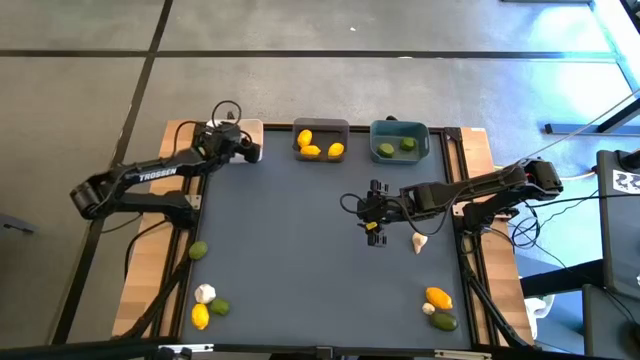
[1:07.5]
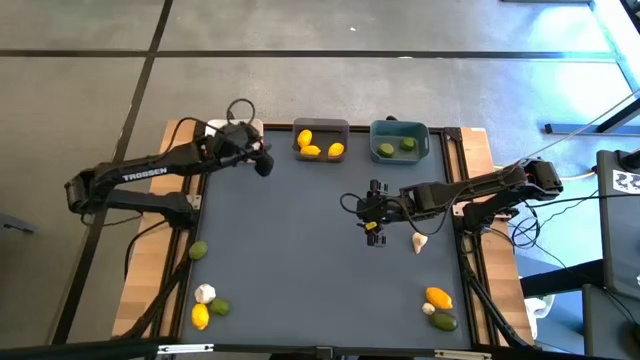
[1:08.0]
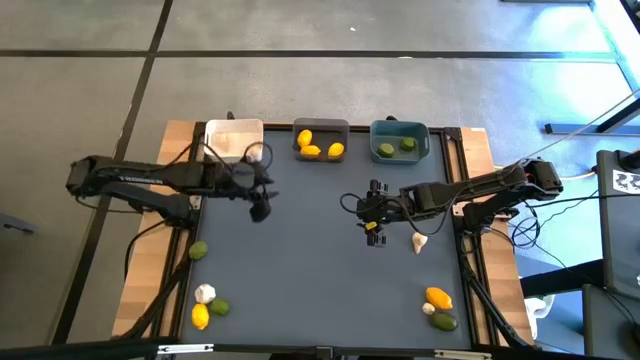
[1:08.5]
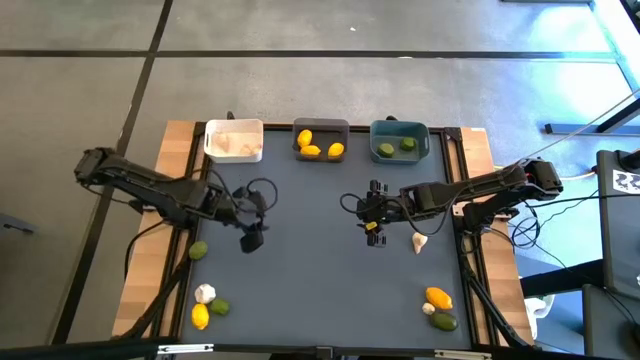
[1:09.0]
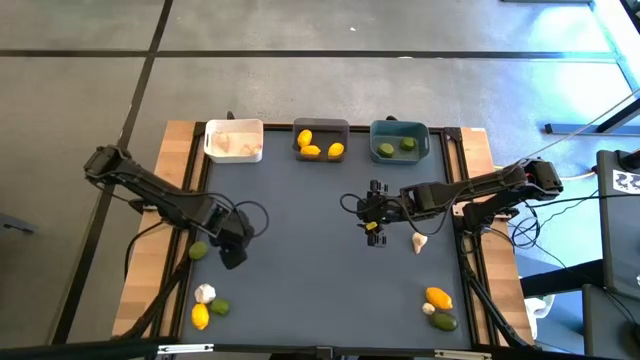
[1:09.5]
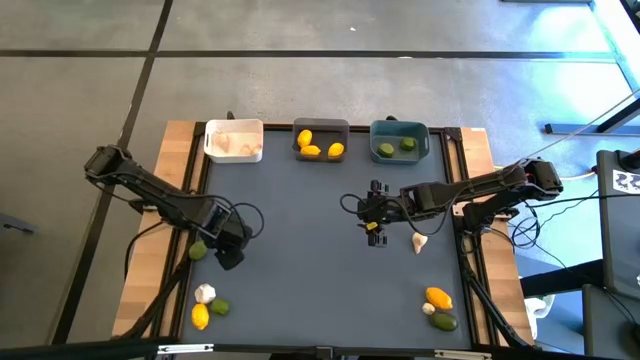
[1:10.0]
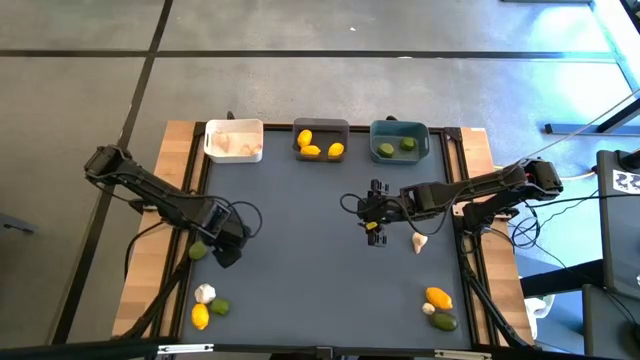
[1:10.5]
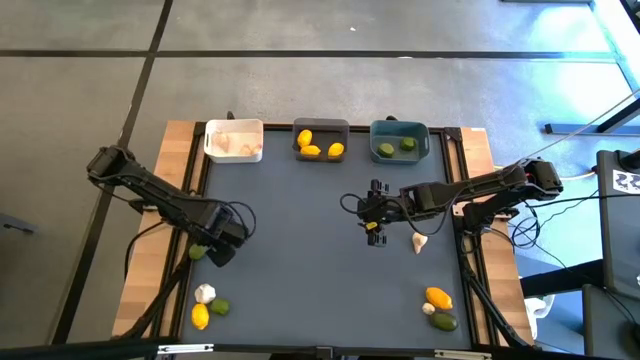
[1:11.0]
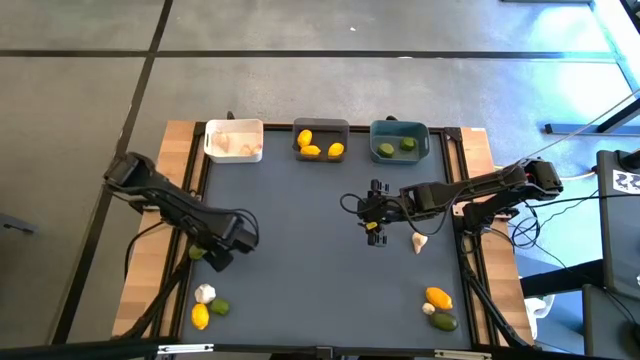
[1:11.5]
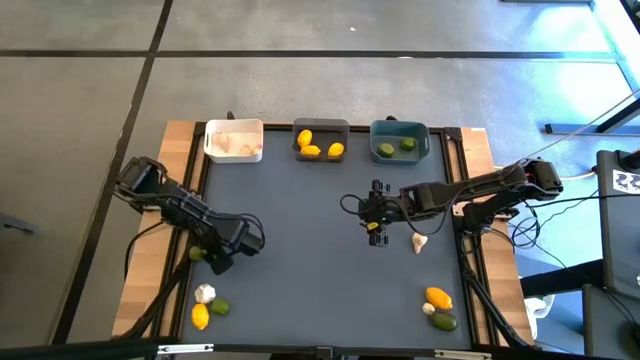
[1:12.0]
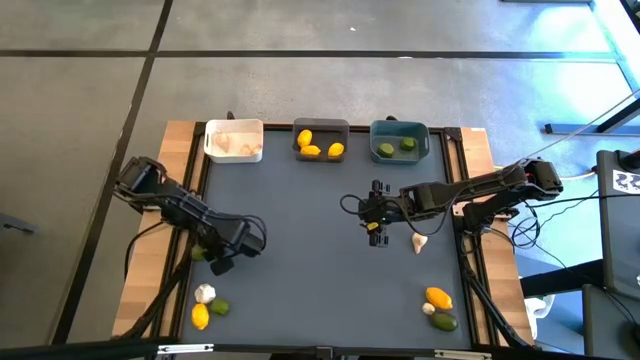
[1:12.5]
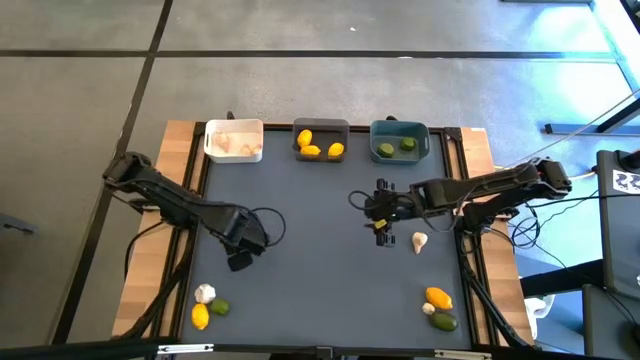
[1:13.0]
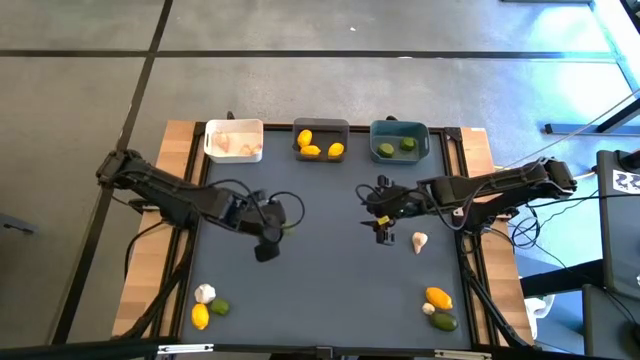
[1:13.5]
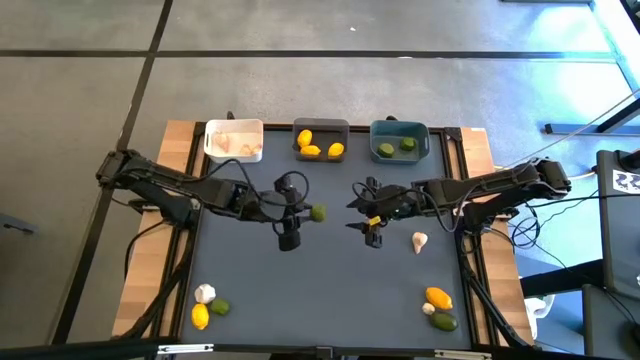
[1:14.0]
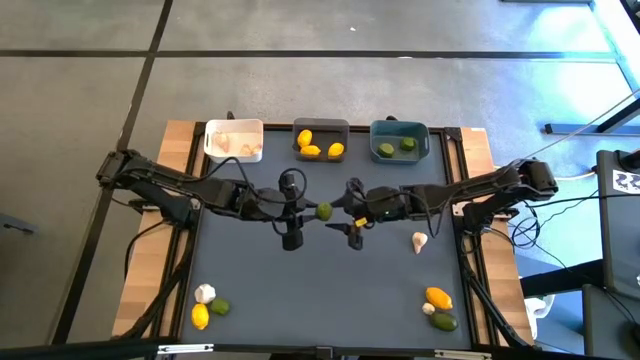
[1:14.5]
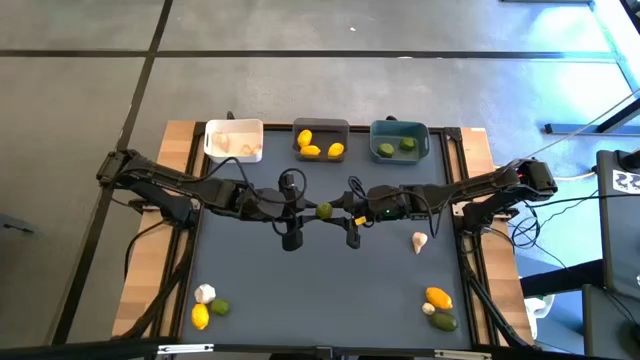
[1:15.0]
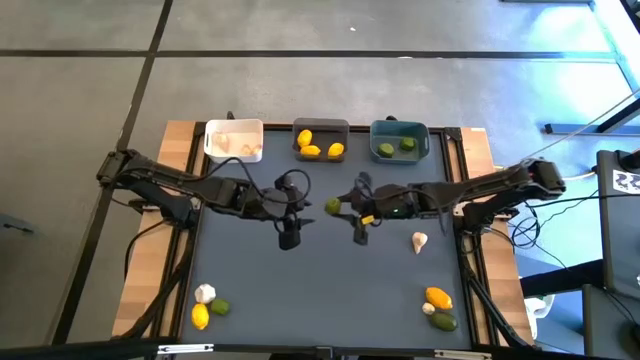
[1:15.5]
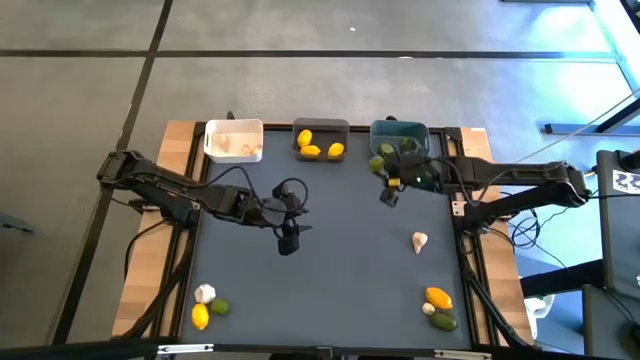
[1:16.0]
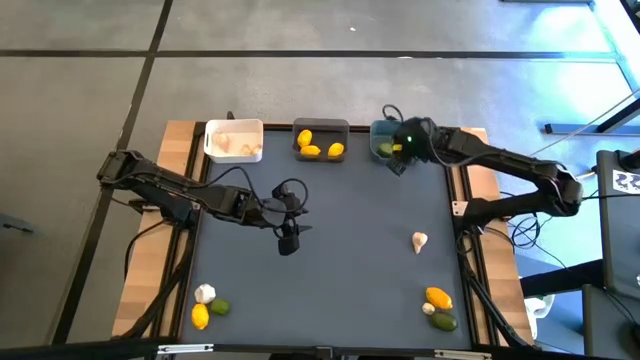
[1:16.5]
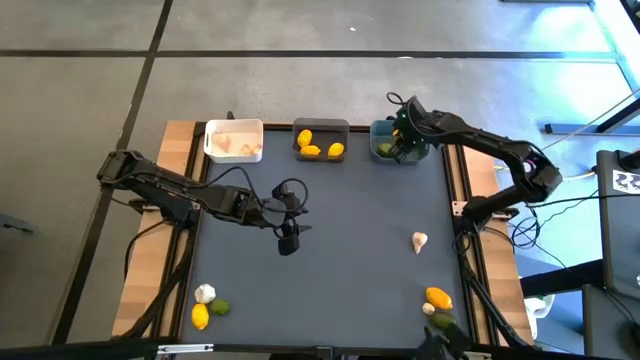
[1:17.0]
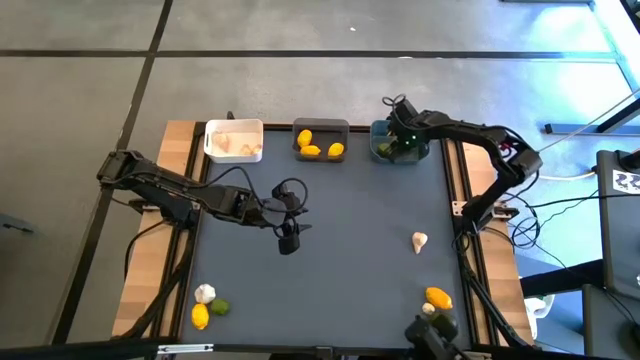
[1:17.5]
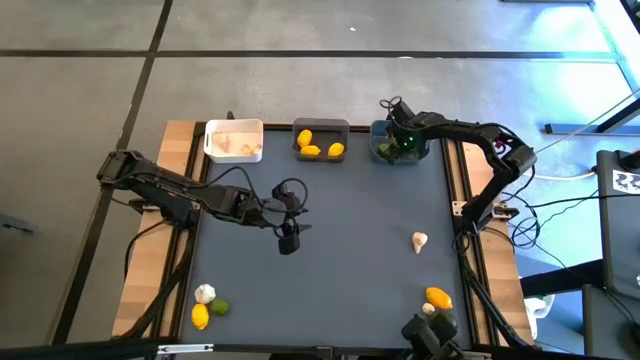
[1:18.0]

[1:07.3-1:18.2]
Task: Sort produce into baskets
Put the lime into the blue bin

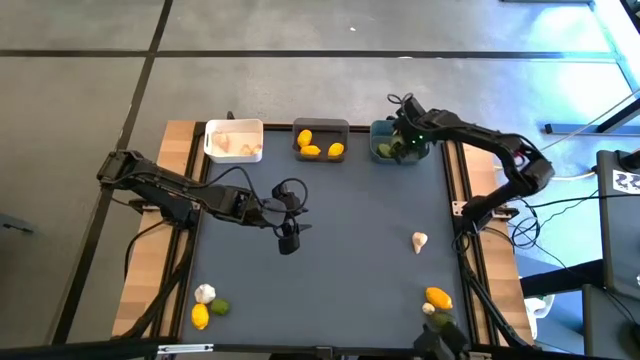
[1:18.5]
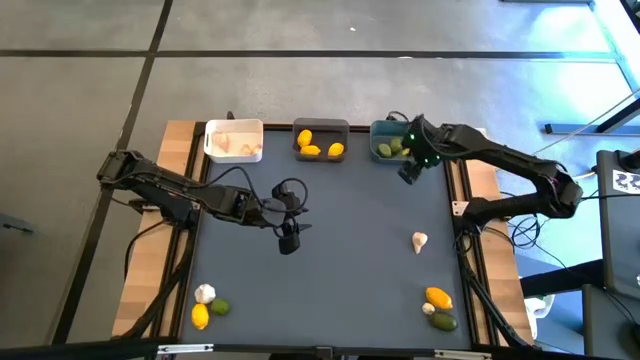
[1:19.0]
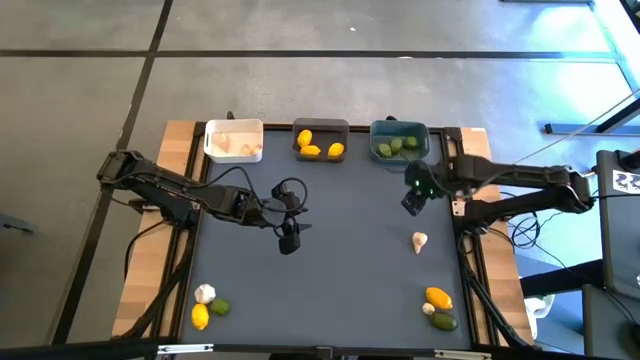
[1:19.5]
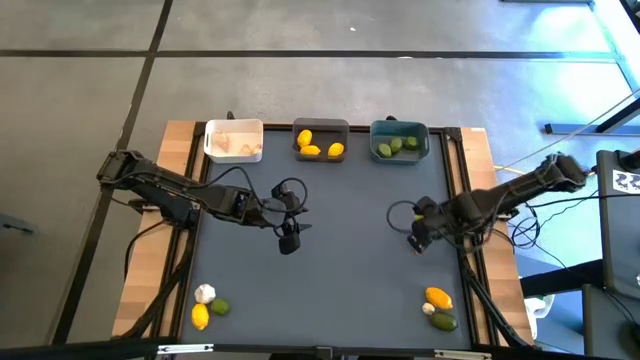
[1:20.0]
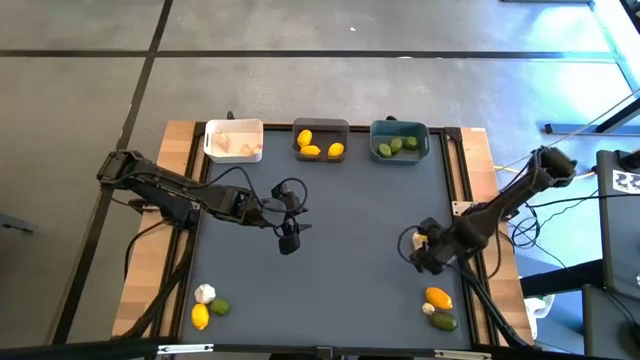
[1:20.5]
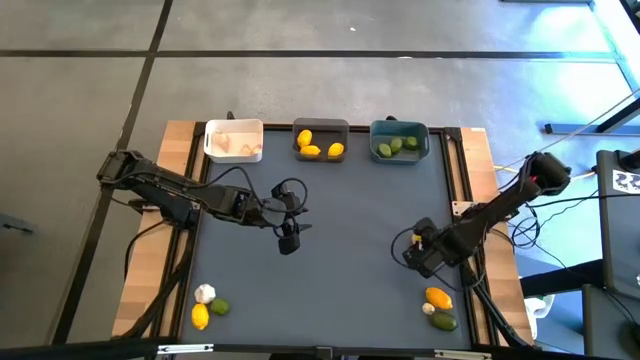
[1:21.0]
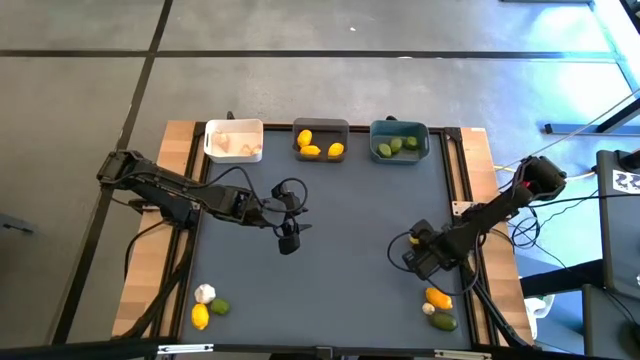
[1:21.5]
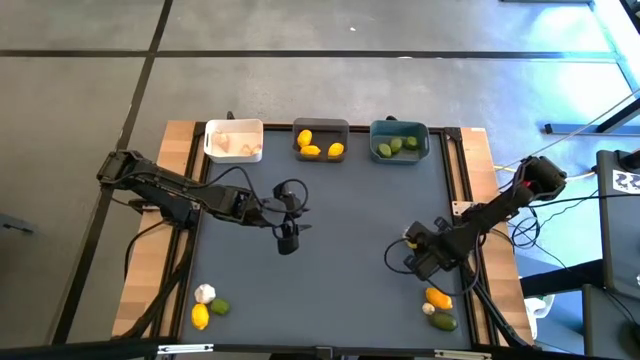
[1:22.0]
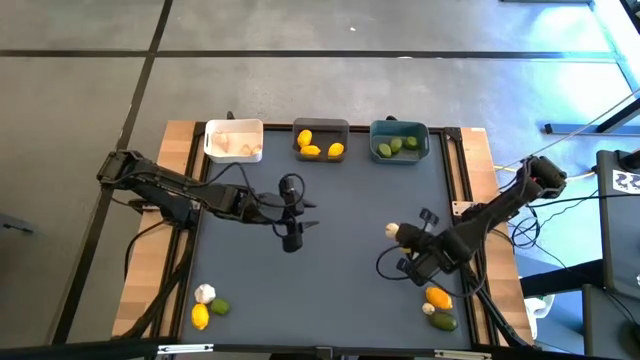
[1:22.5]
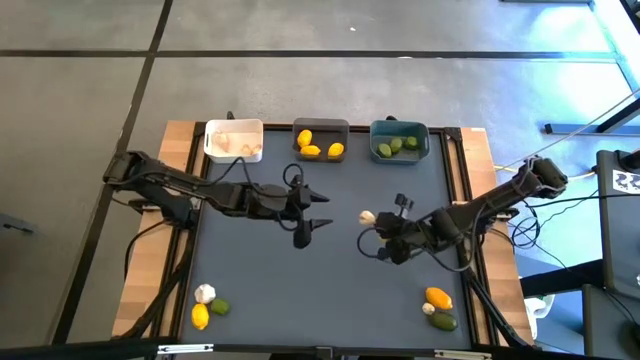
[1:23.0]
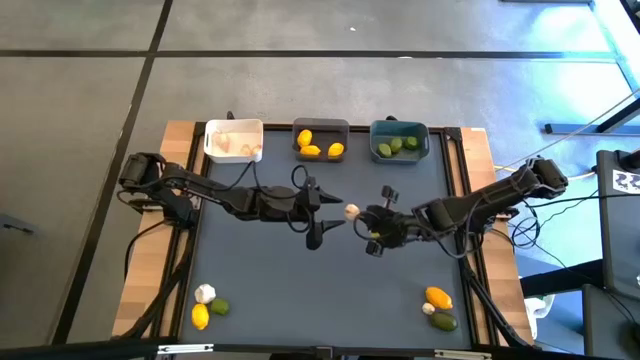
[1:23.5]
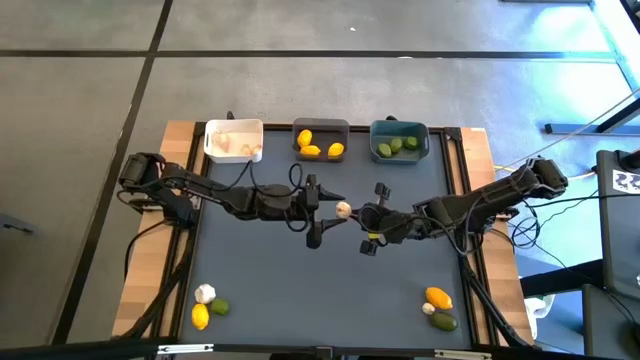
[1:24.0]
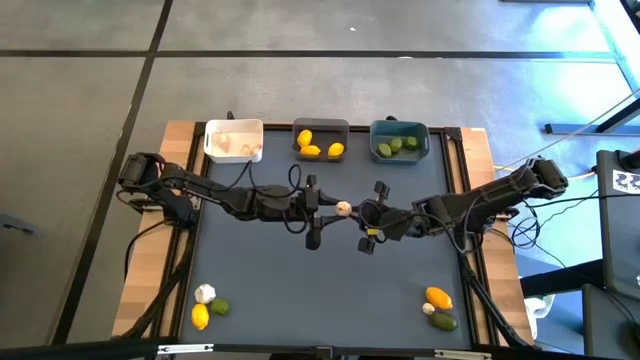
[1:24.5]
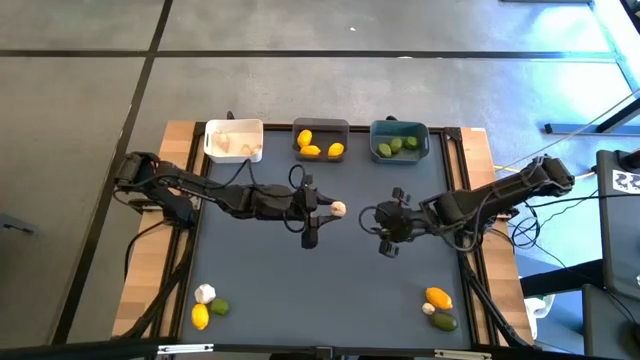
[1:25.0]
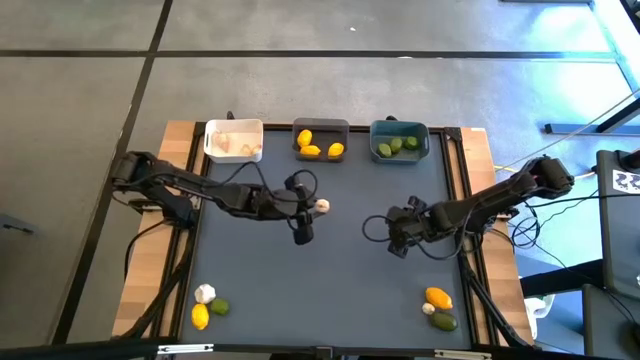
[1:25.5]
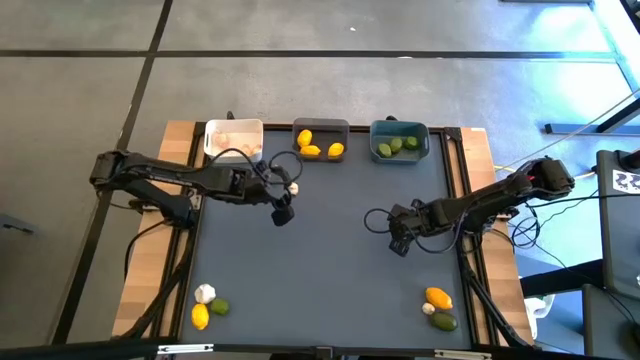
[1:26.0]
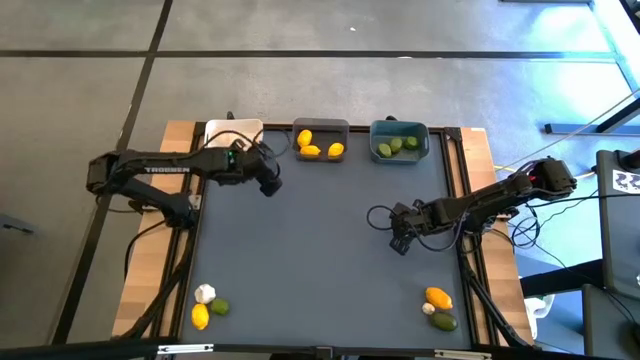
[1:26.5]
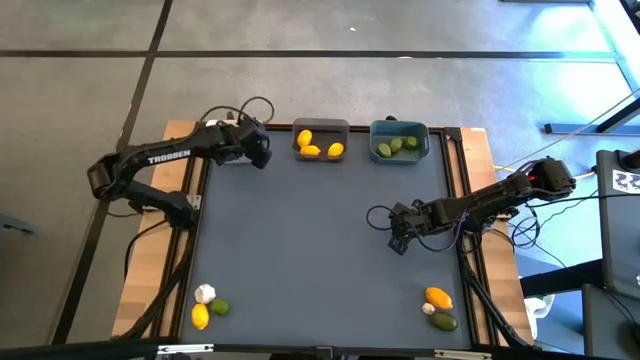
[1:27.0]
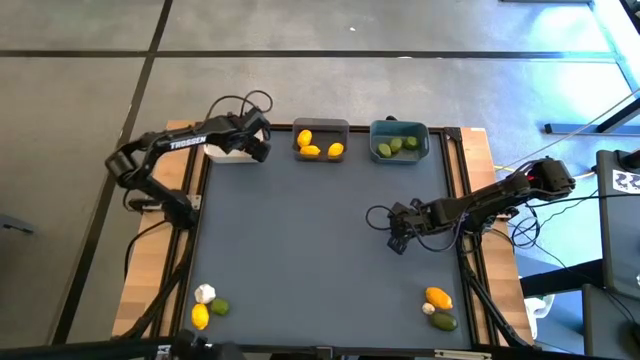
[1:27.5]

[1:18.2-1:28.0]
Put the garlic into the white bin
